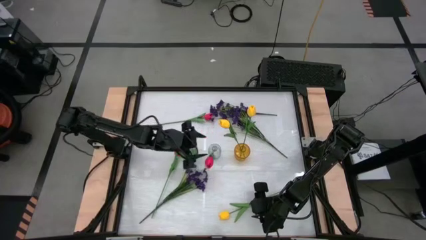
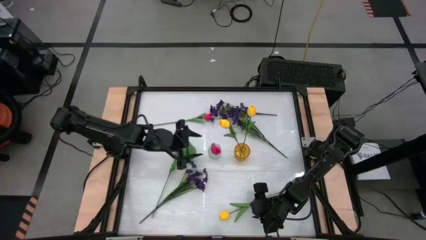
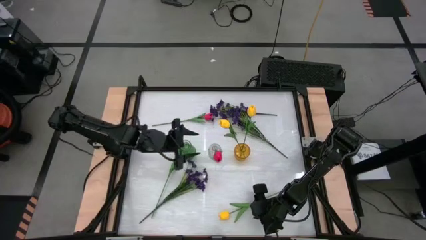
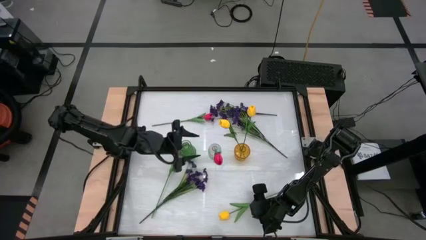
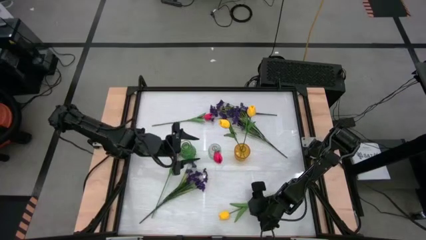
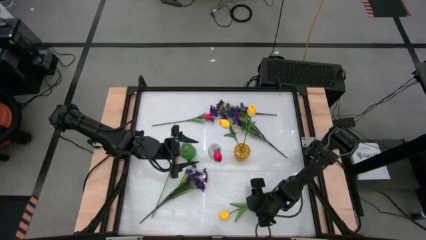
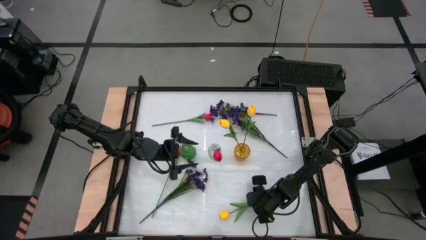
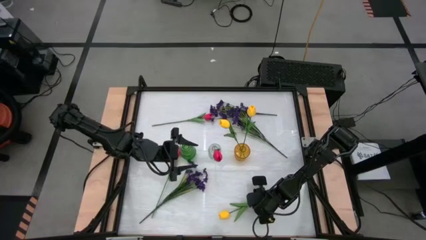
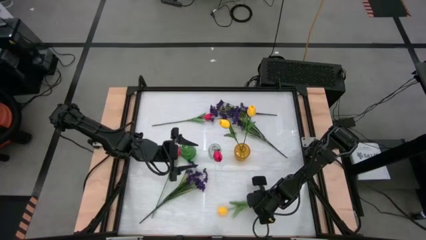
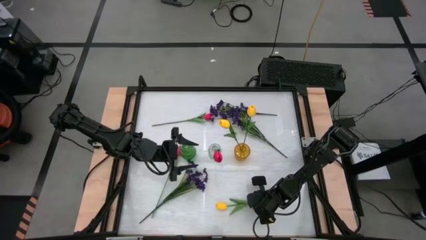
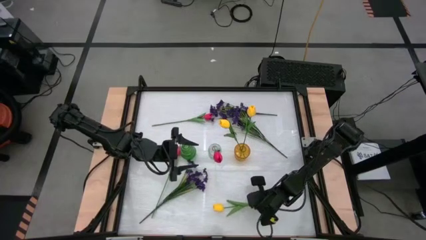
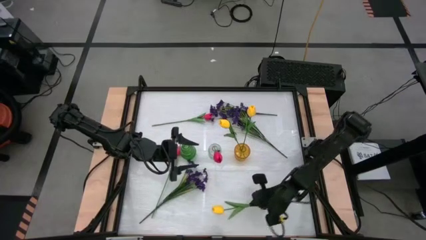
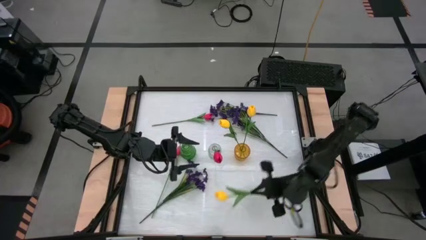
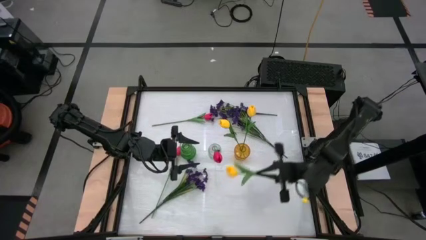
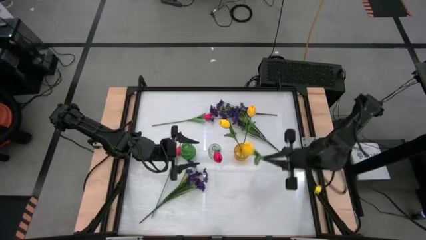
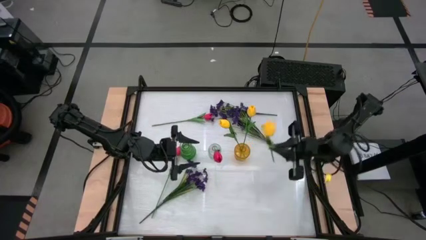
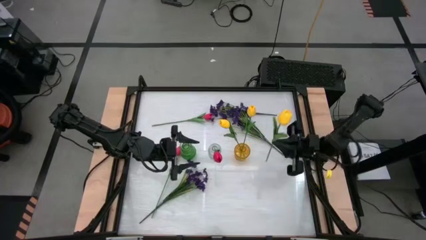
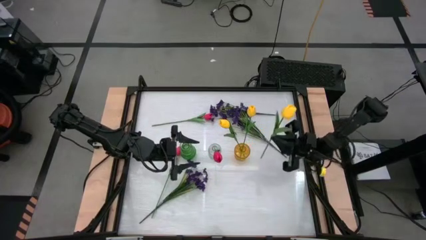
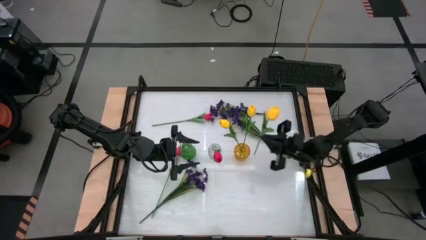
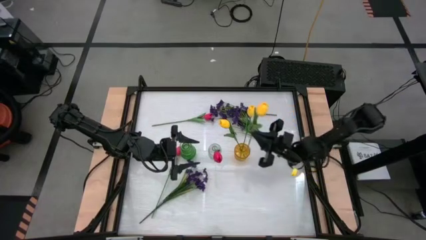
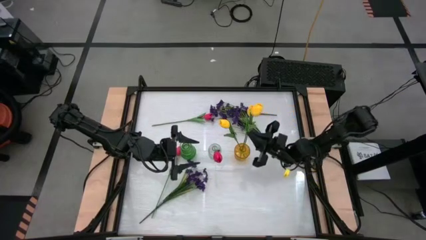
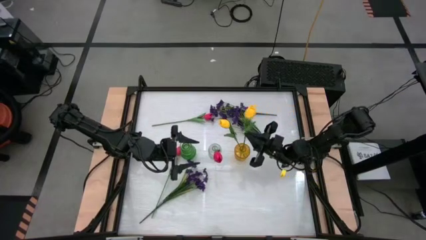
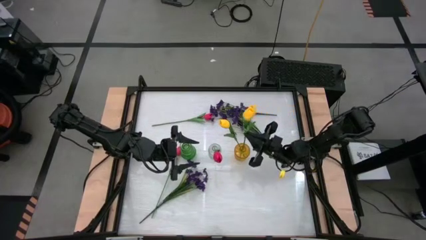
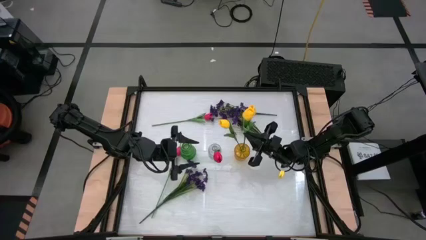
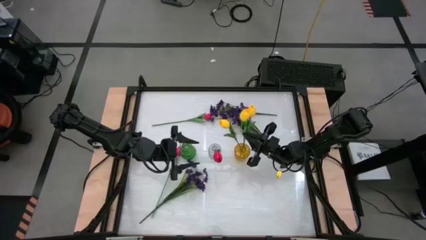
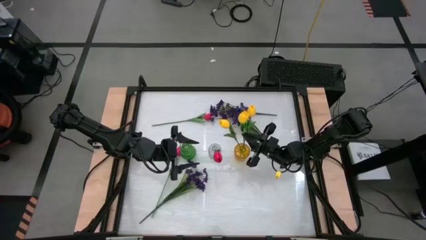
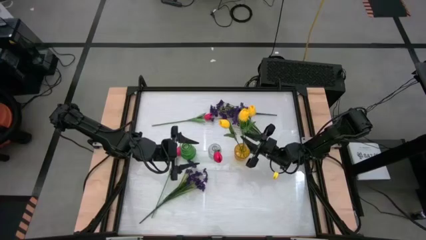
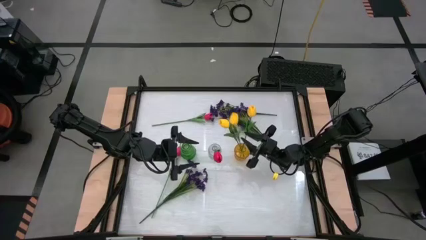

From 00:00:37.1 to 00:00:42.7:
Task: Sort flowers into vase by color
Put the yellow tulip into the yellow vase

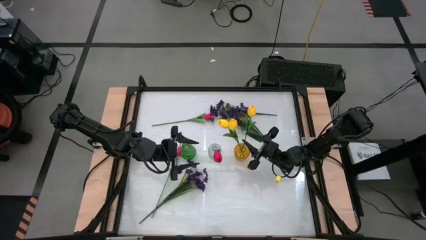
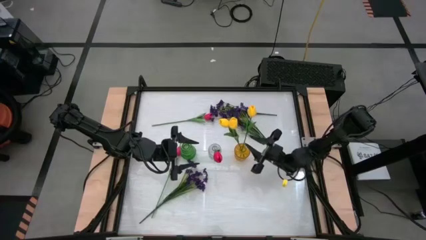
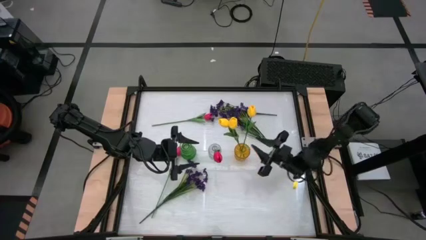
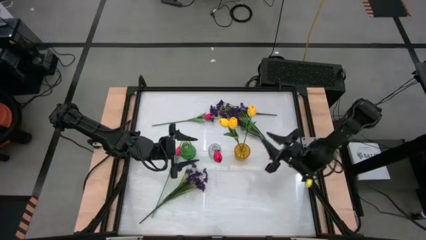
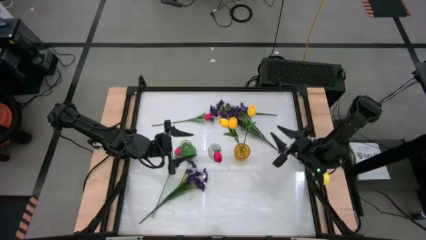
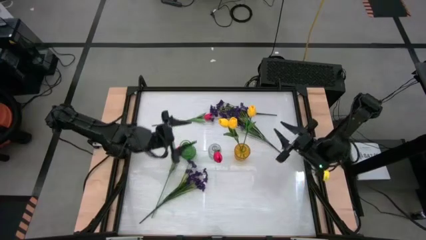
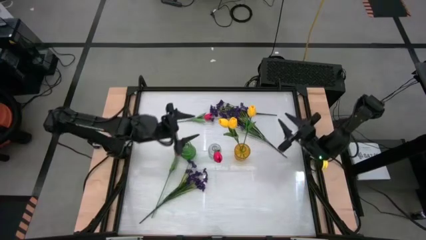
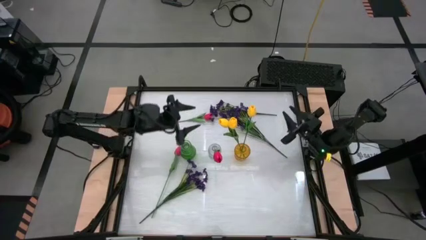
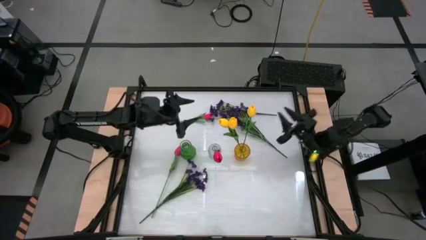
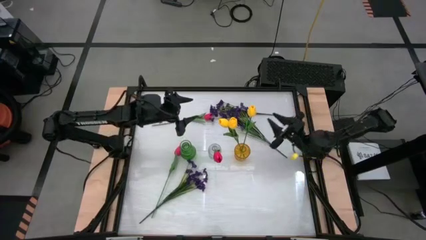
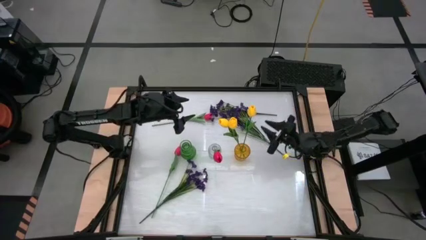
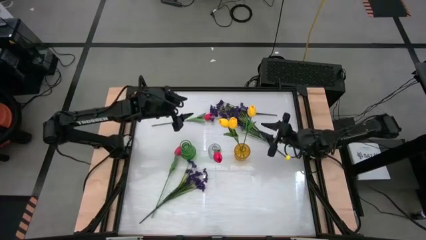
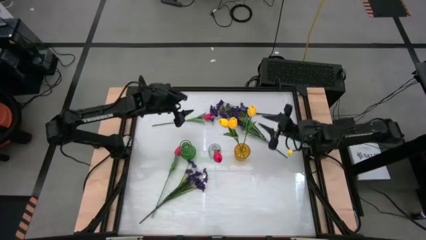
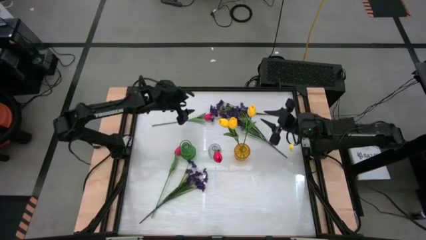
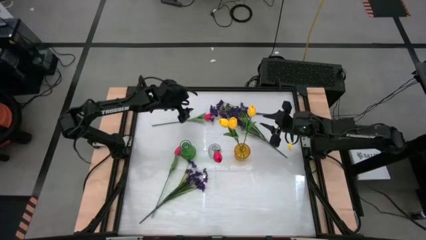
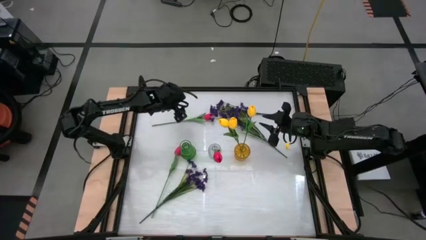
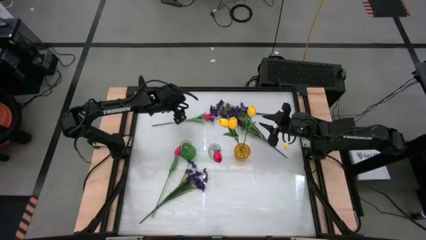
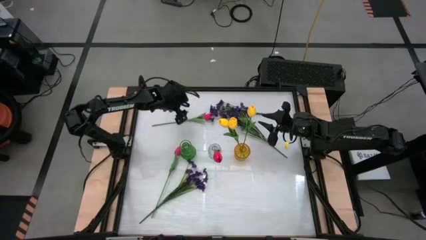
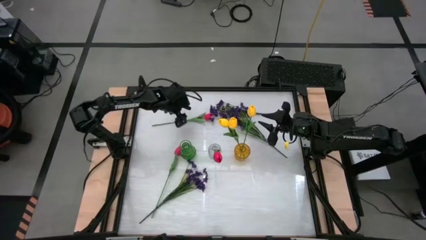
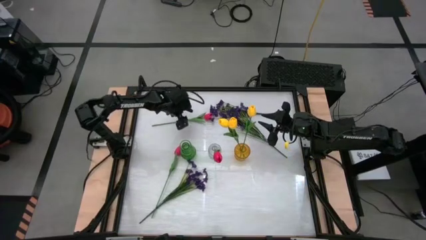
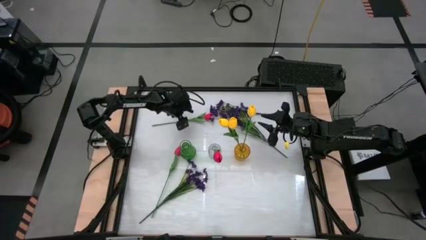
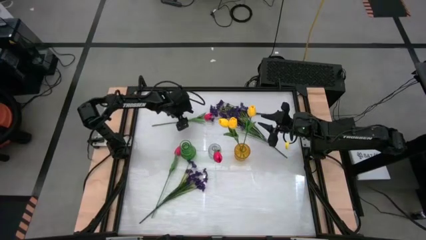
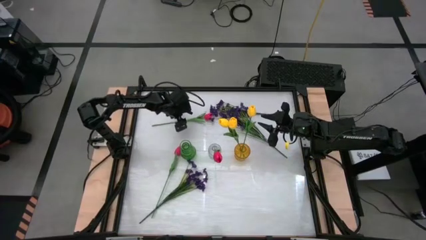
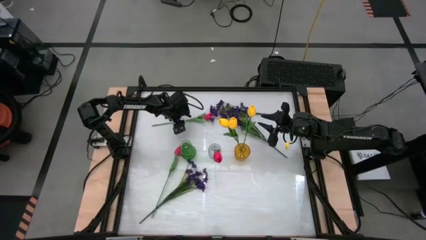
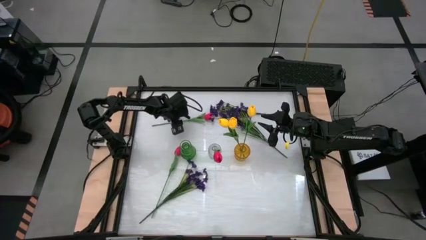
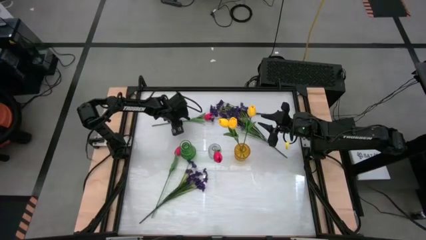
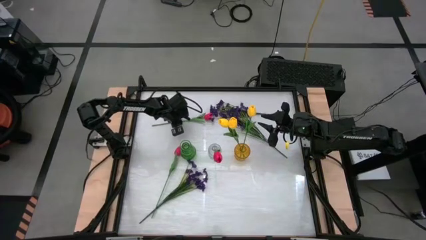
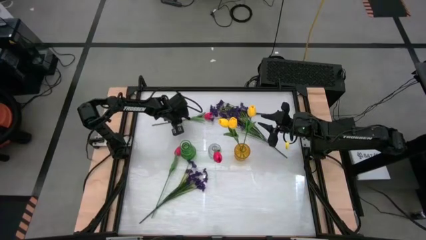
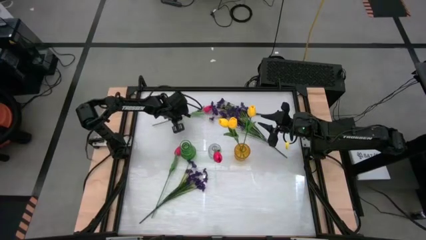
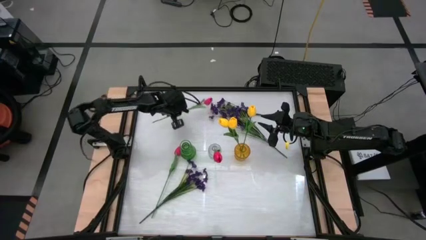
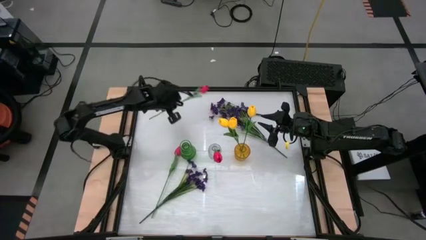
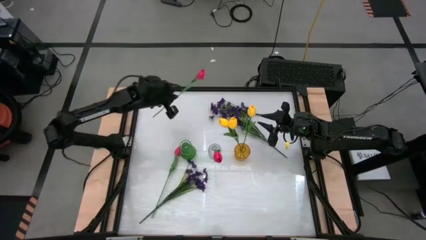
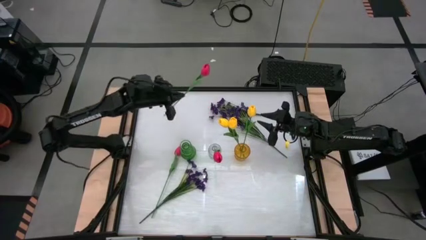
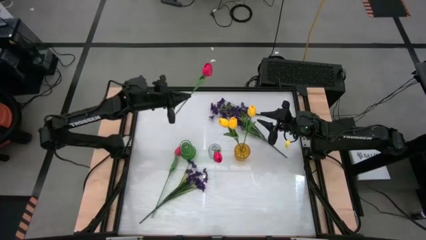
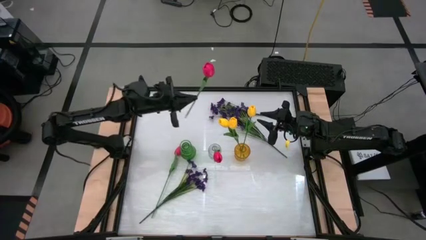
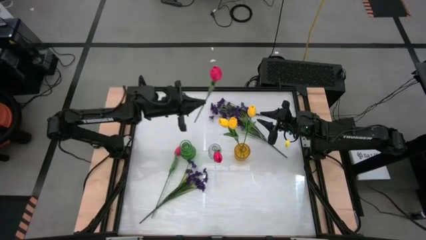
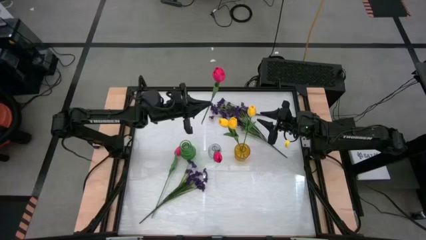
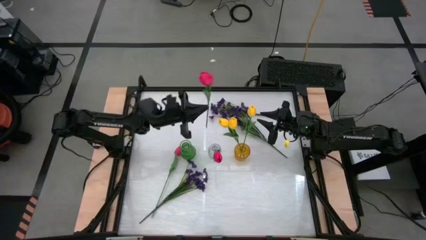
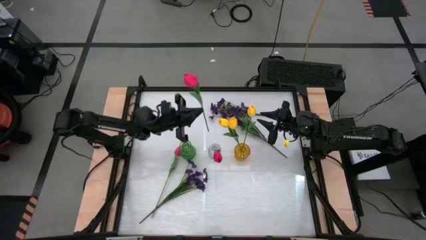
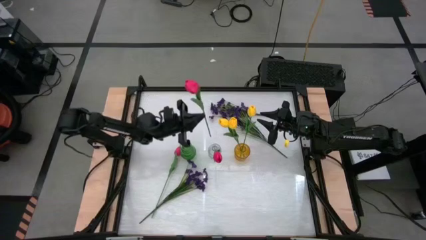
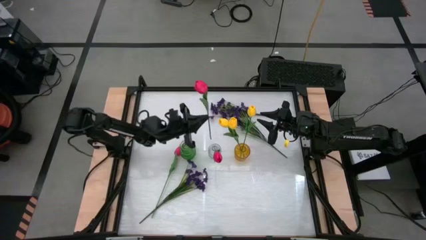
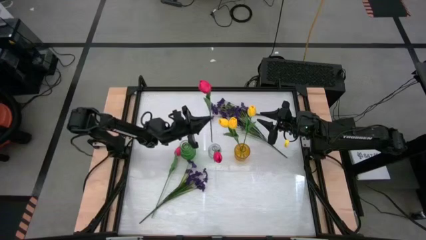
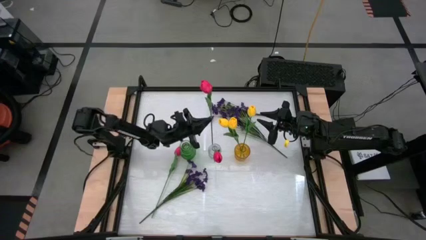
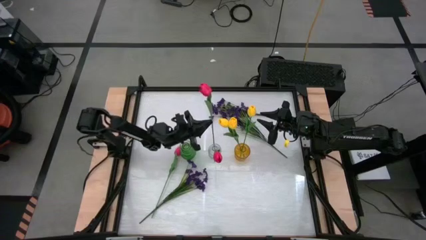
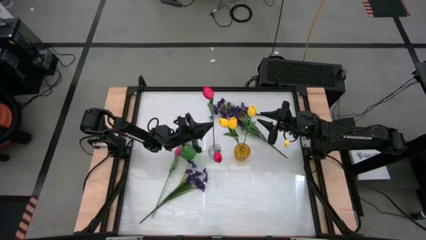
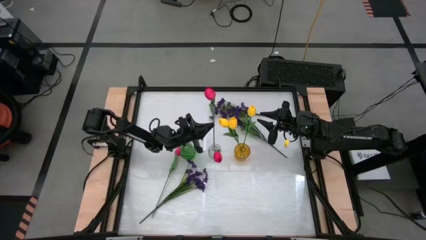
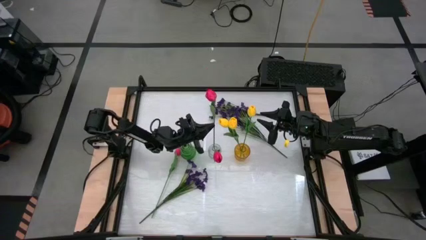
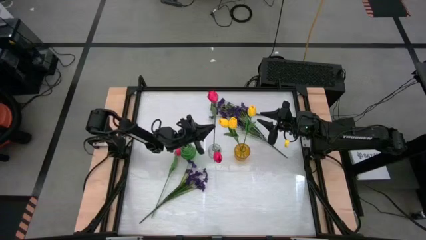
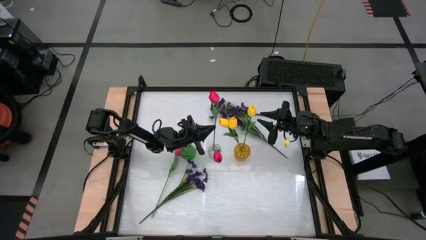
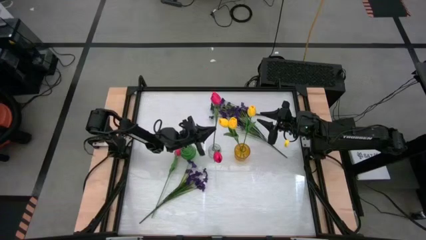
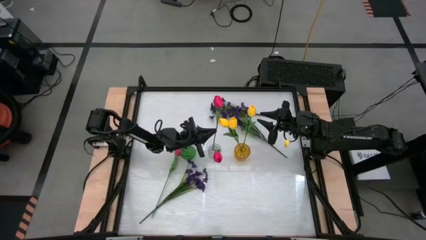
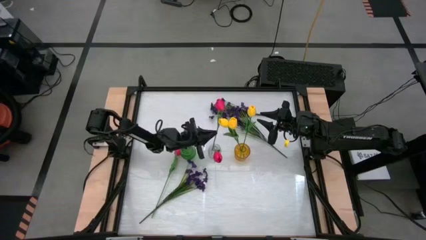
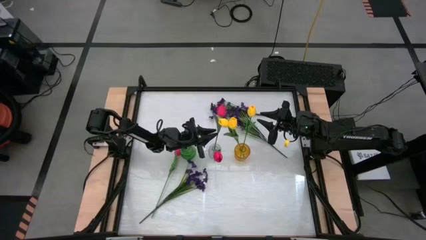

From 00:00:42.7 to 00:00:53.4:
Put the top red tulip into the transparent vase

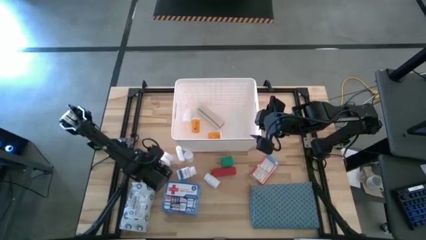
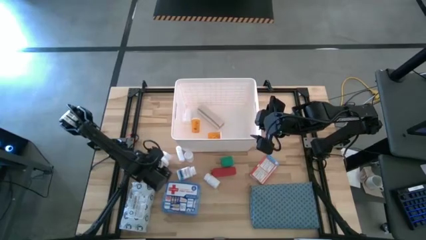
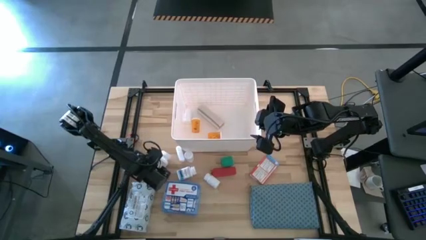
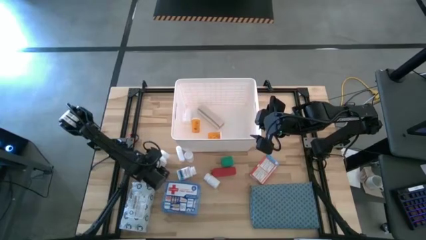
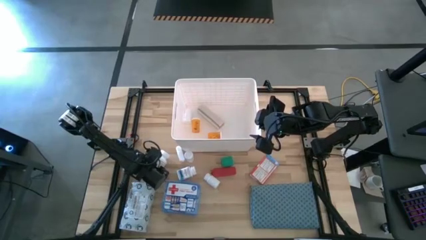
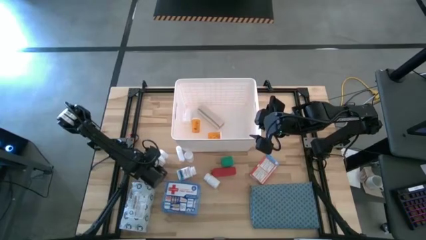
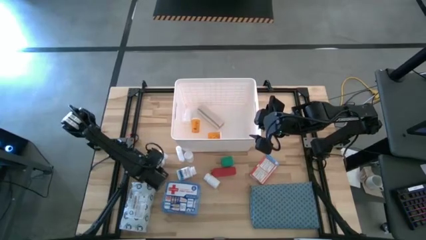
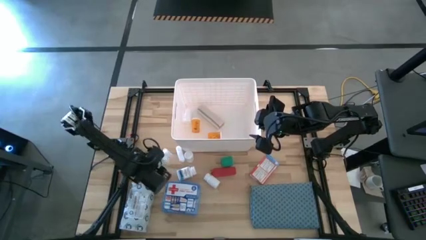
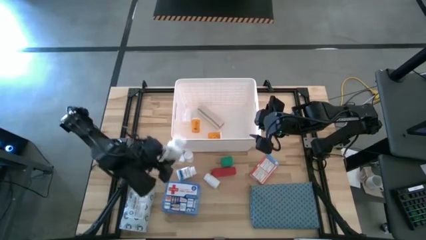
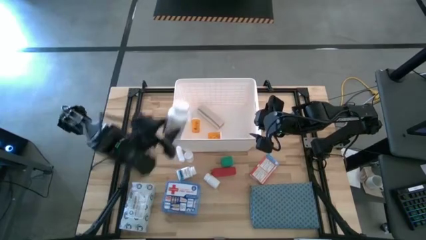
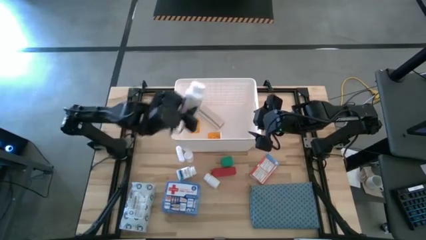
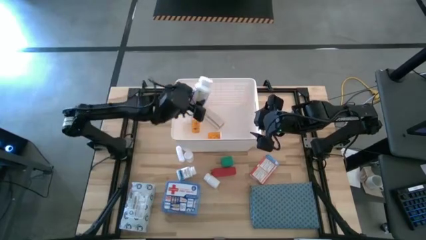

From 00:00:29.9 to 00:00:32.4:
Task: Pick & place medical supplies in basket/bin
Put the purple medicine bottle into the white bin
